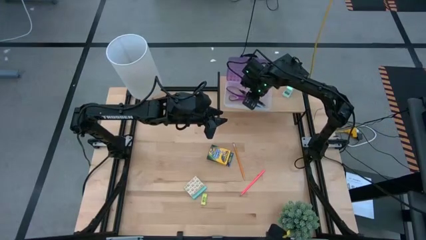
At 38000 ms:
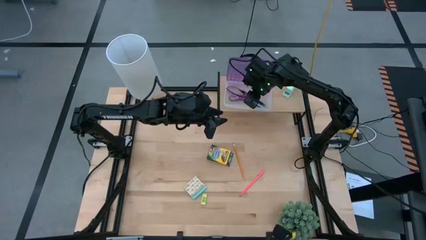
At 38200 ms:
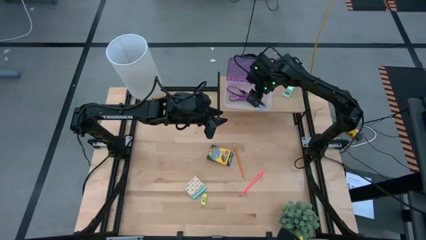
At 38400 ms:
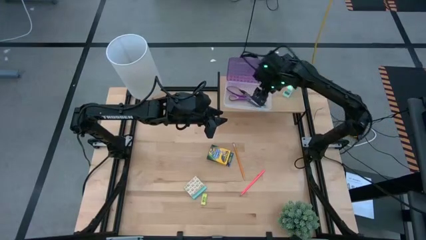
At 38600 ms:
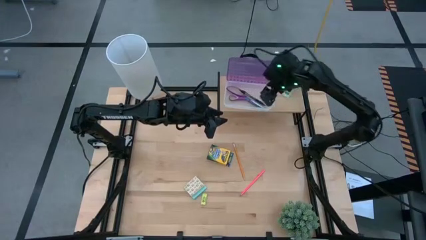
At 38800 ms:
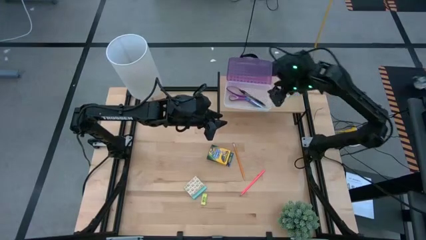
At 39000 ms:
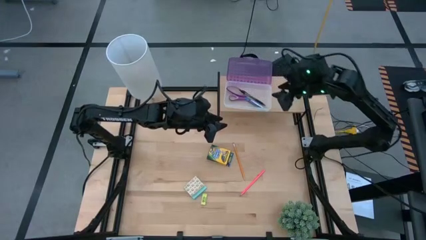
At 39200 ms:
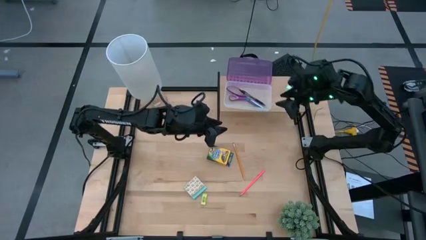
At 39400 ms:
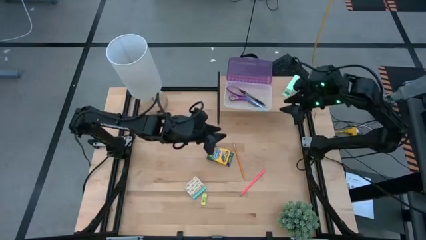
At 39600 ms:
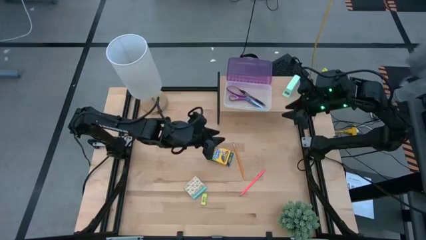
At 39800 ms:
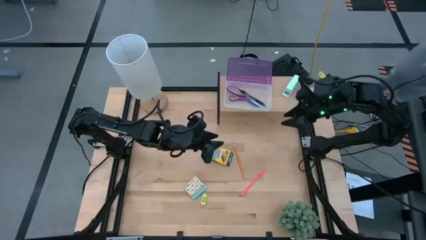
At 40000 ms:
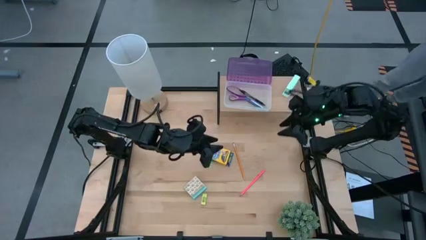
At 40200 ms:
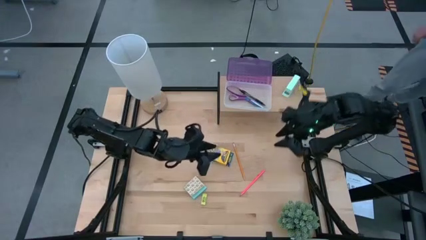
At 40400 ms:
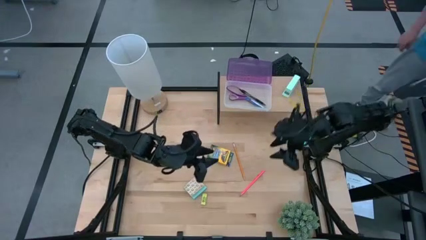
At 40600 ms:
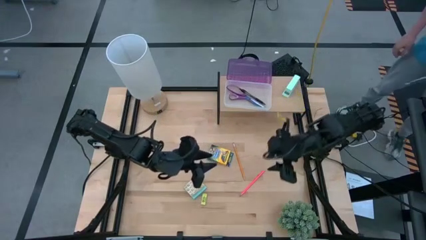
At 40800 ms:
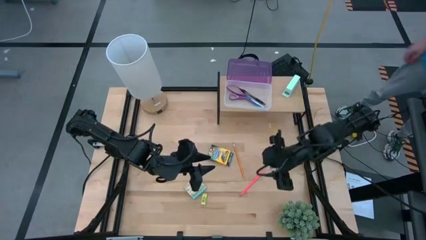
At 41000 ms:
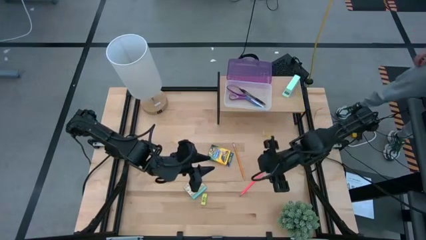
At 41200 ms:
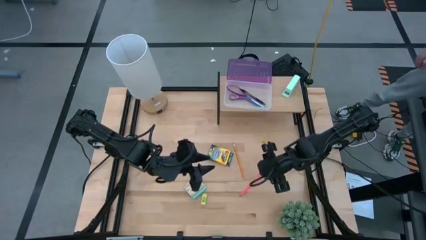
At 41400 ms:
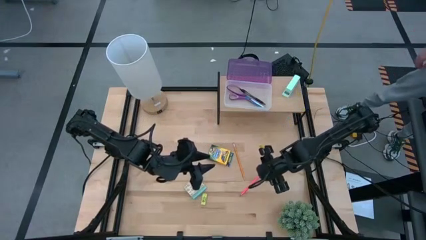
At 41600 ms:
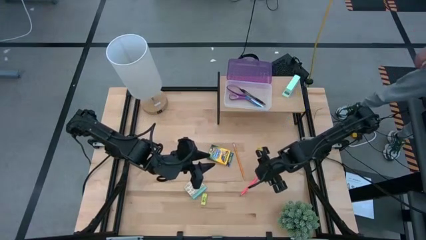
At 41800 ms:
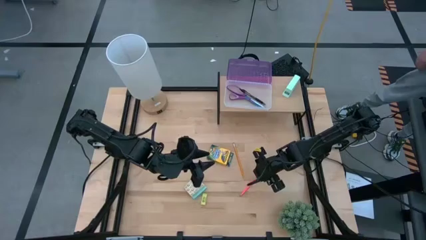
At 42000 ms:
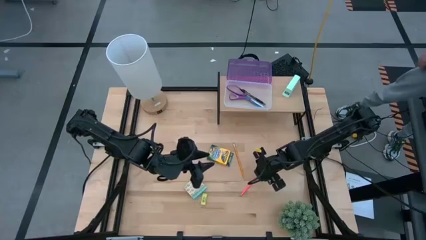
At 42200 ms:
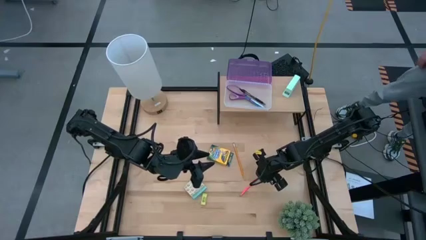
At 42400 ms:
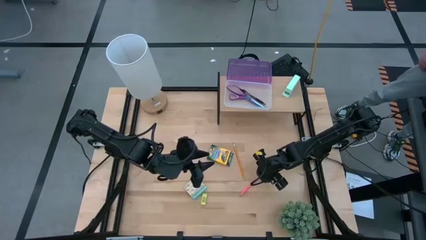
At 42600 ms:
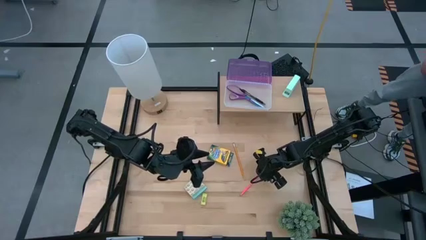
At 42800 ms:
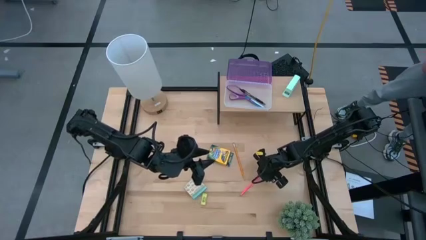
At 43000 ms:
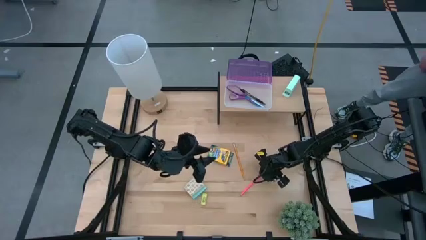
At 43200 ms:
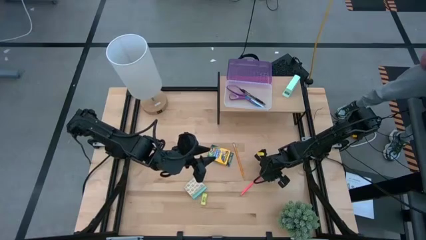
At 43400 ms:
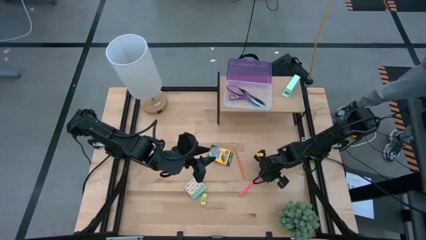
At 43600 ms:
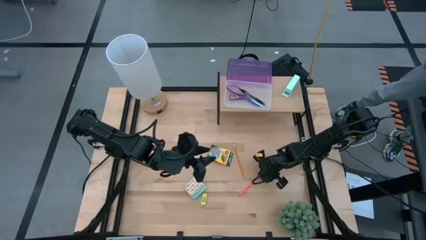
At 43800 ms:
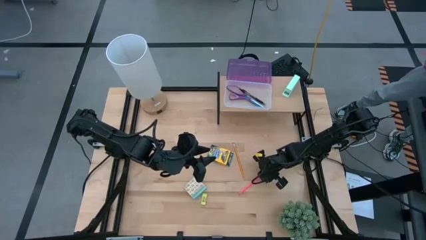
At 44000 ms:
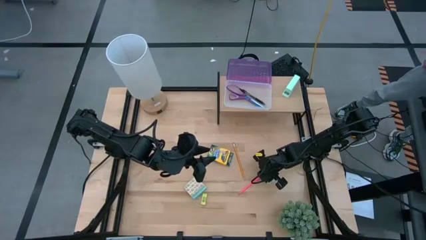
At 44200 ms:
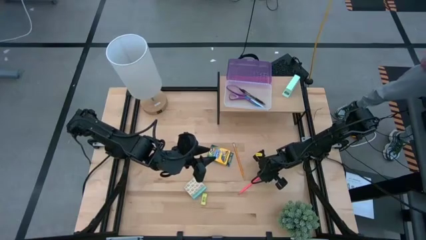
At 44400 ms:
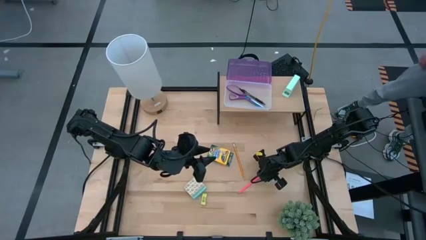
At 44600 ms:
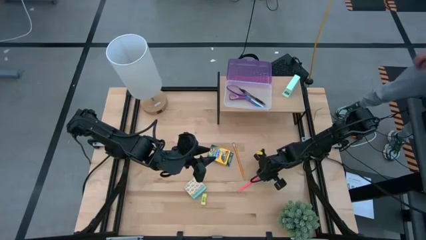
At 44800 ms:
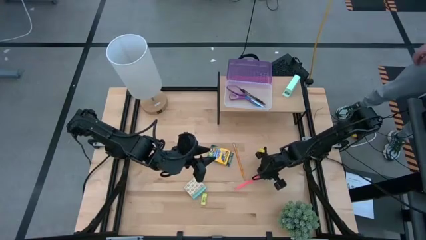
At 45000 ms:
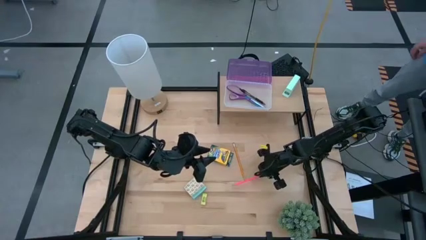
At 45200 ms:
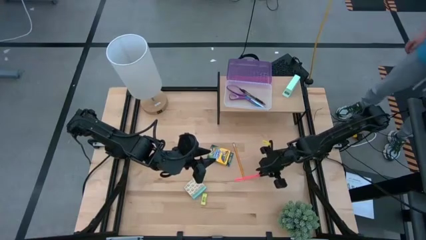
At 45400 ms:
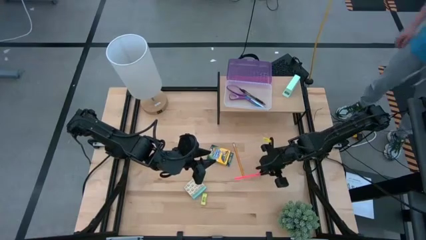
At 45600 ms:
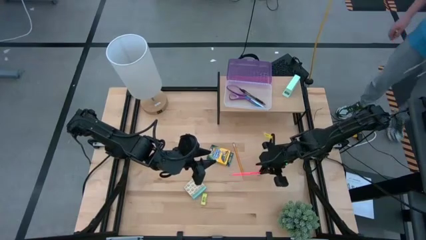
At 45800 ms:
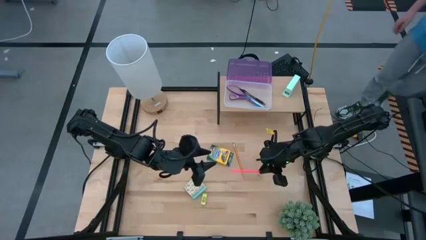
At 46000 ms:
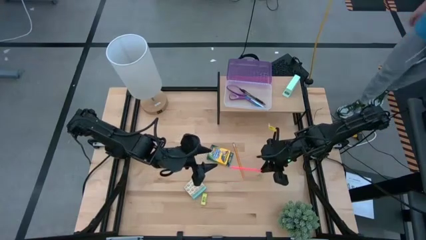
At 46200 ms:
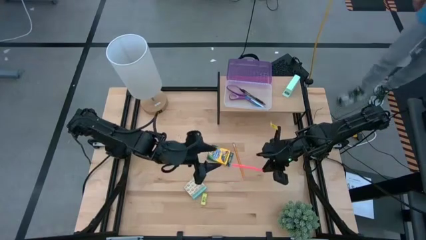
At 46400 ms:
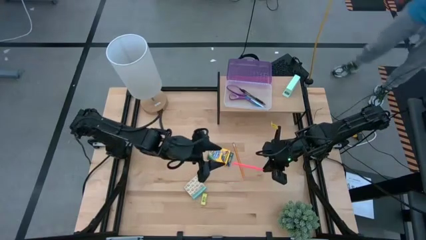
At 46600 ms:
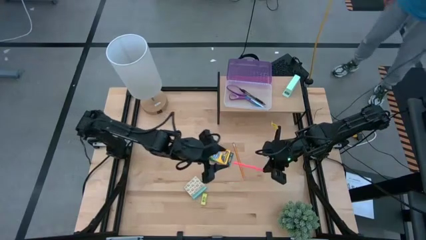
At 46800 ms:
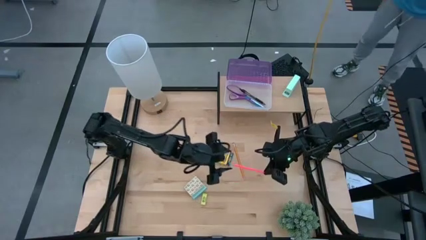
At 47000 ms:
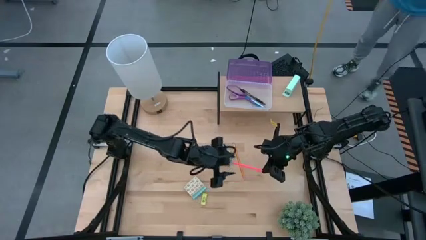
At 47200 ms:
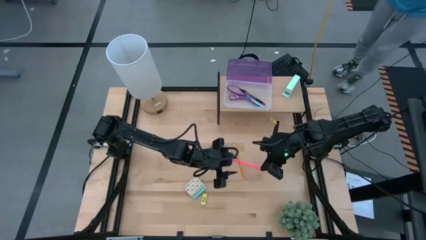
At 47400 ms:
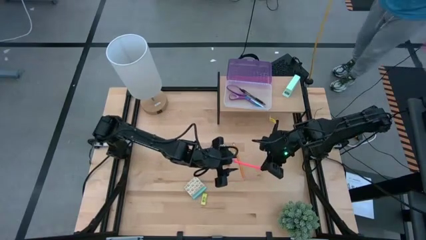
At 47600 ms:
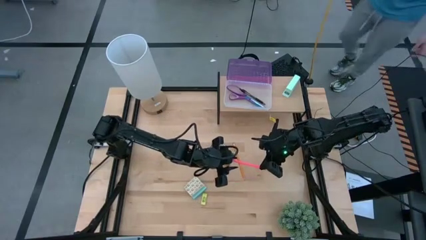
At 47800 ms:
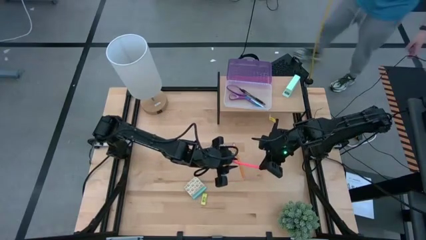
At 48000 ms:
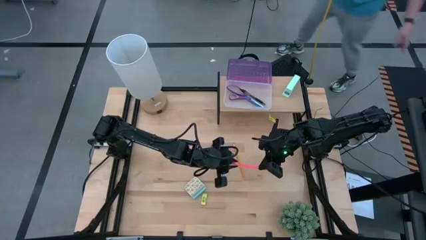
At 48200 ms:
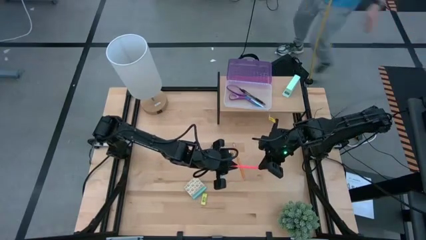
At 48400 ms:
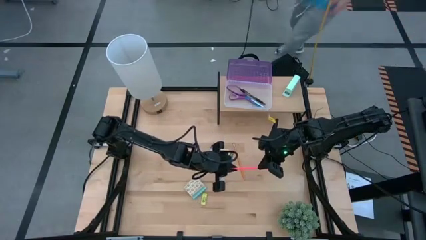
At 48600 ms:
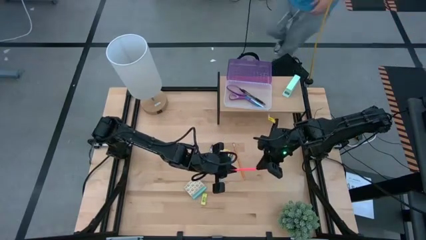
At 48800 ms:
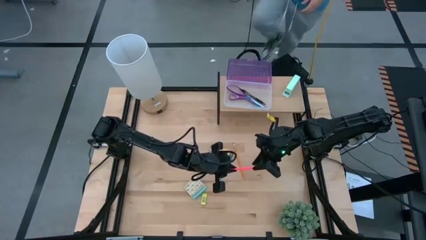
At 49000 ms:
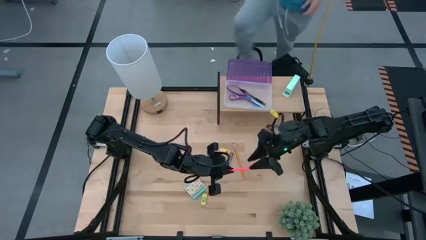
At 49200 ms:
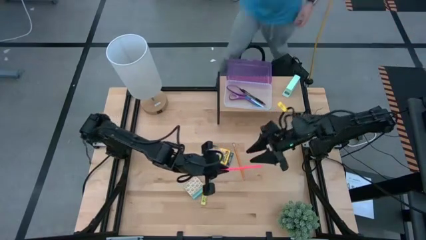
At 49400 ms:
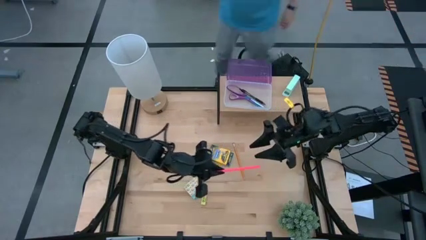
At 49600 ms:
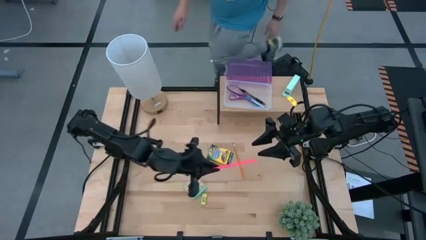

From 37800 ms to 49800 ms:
Task: Pick & place school supplies into a supply box
Put the pink pencil into the purple supply box on the shelf

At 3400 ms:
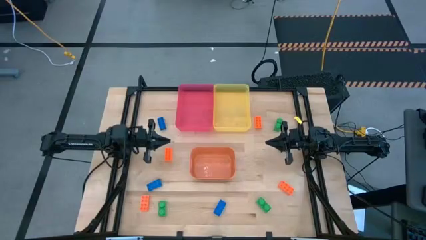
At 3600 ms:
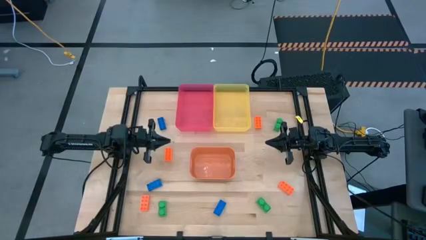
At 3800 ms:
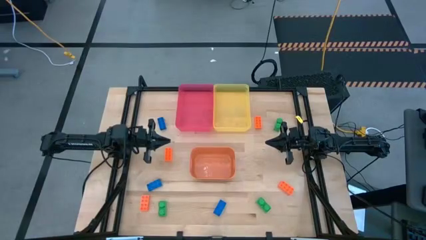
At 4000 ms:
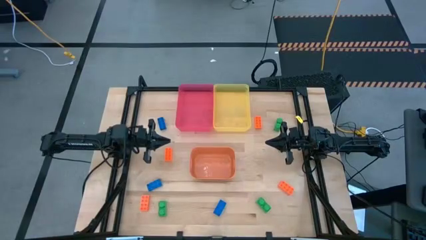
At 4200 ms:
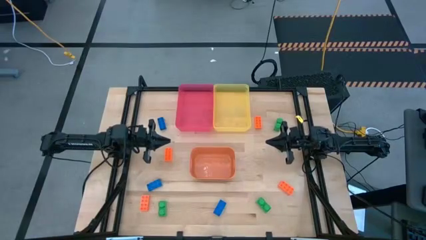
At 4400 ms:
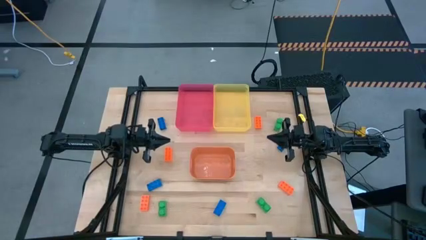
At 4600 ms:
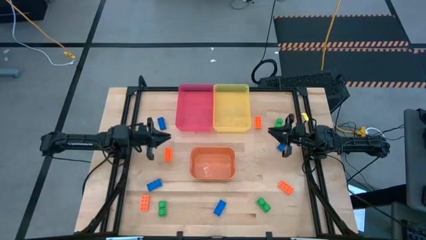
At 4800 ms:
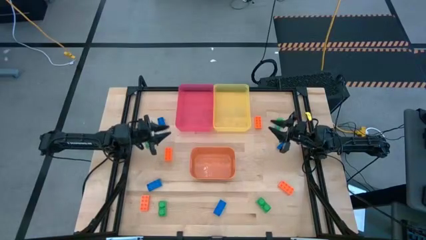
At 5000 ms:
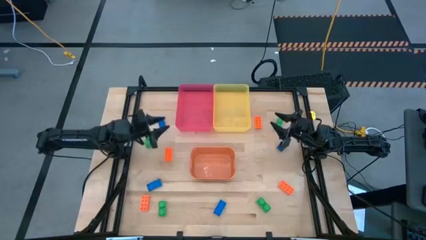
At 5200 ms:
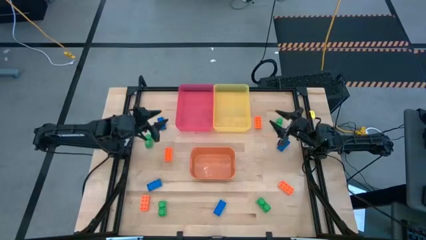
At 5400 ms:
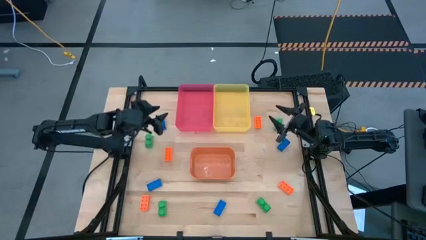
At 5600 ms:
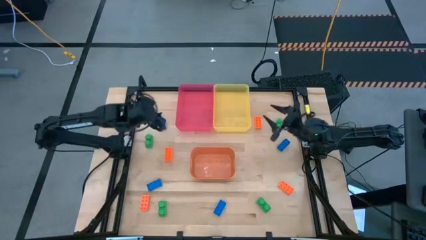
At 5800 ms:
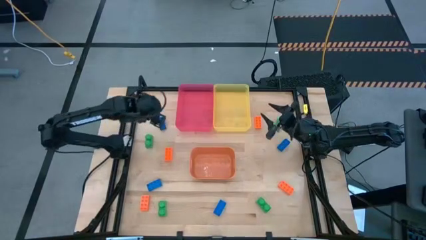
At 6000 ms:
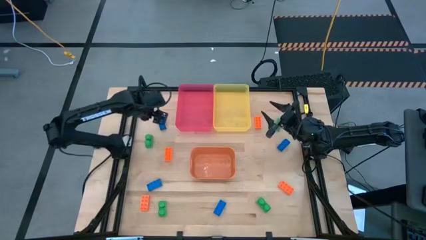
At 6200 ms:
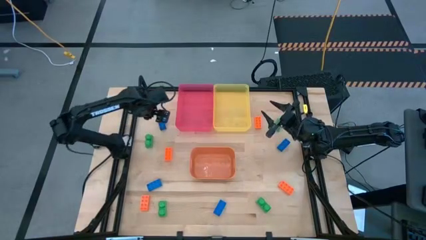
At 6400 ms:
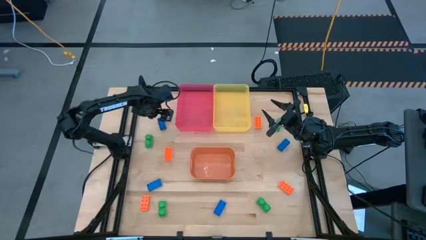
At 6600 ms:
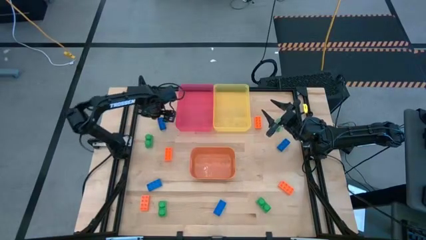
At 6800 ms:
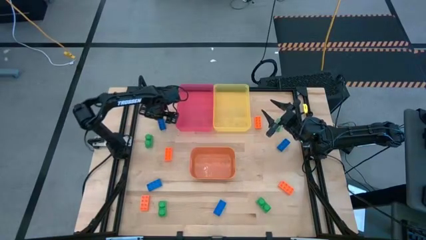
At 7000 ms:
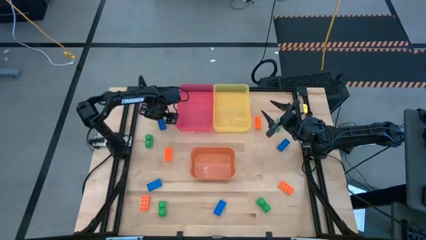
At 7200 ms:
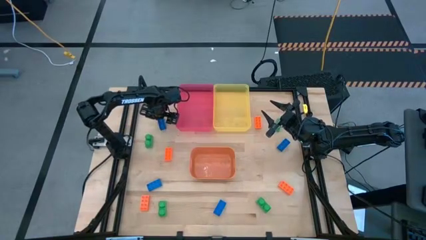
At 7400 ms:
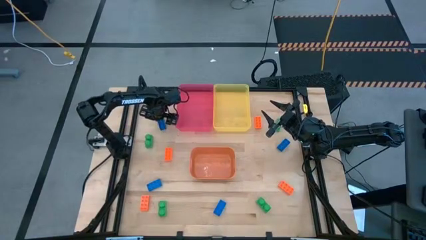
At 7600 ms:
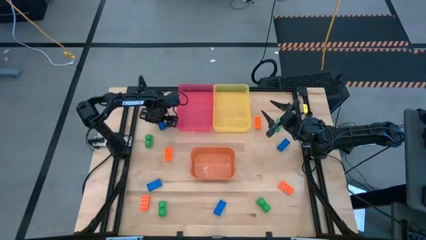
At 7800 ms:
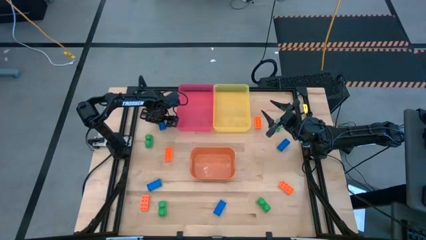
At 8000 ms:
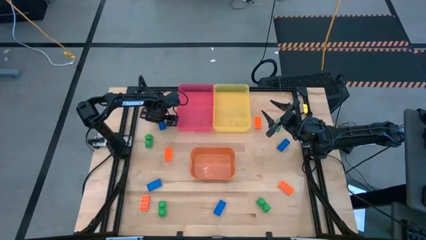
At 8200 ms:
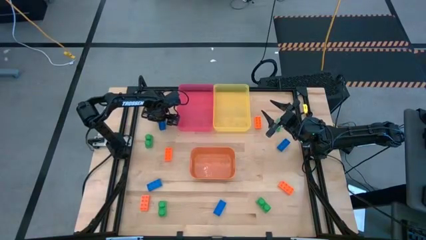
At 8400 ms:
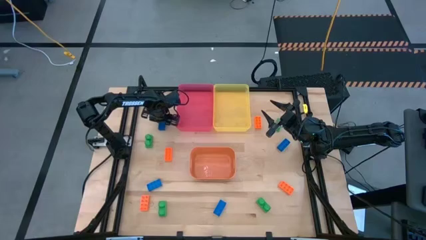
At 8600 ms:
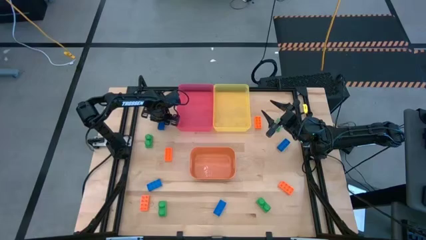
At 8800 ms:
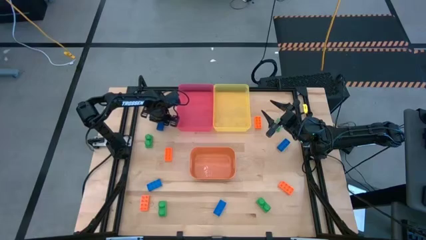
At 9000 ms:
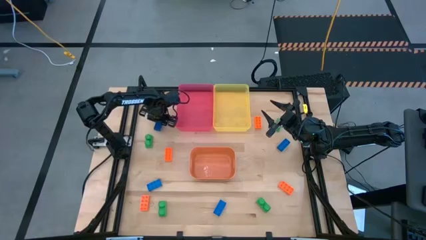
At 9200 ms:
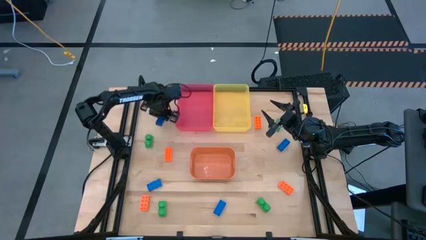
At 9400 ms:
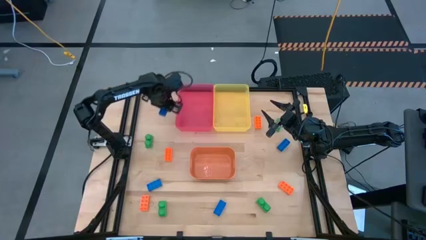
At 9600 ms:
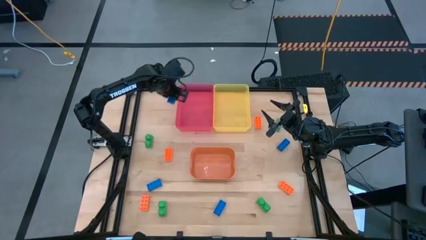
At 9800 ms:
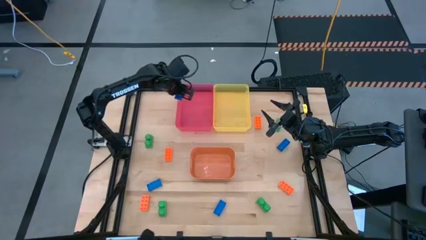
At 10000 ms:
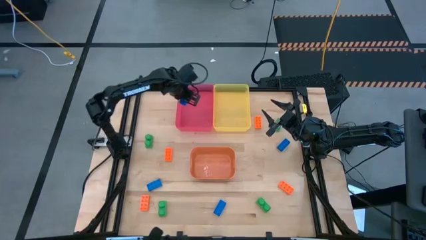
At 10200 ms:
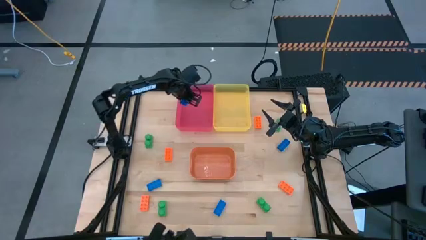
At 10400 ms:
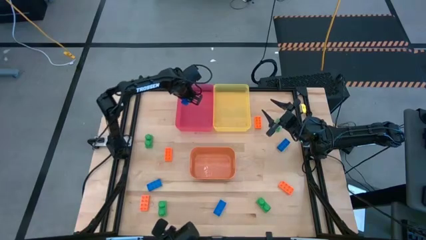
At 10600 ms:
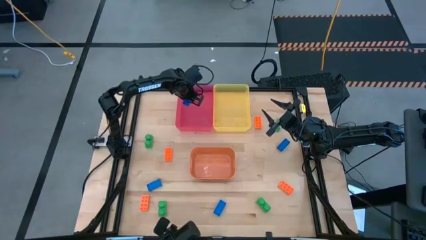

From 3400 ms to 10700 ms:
Task: Sort & place blocks by color
Put the blue game piece into the red bin
